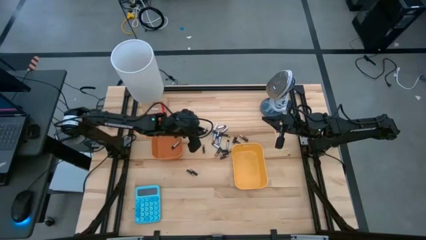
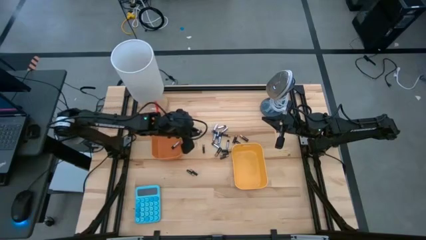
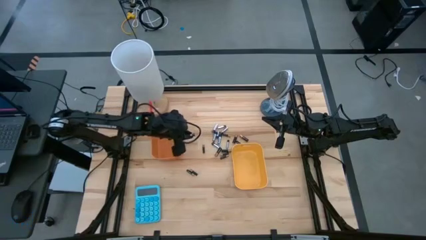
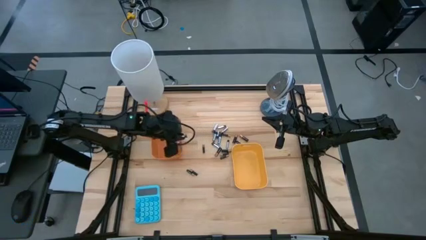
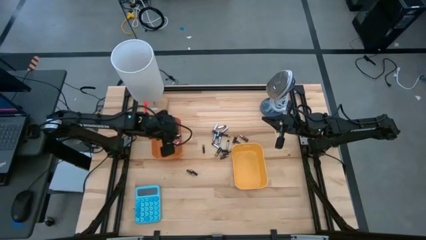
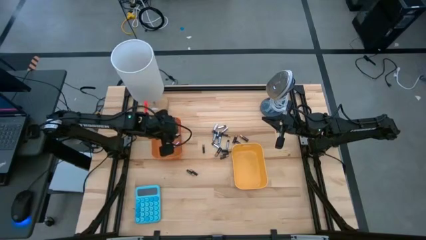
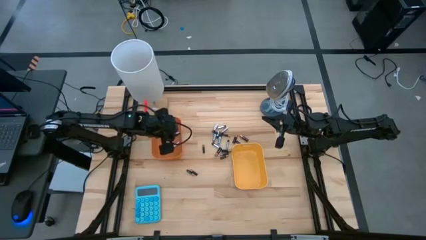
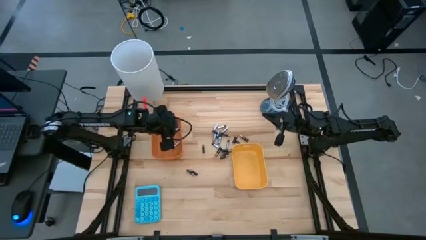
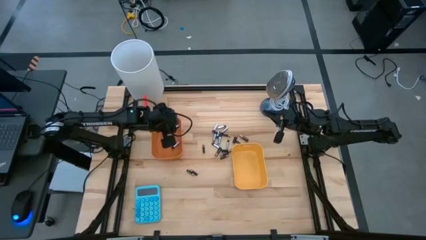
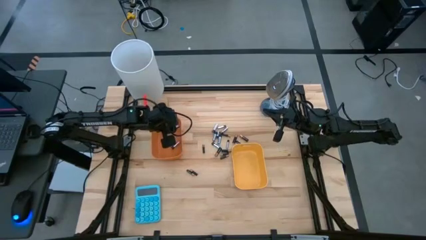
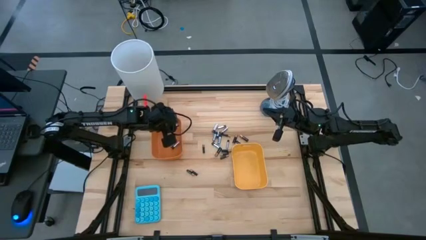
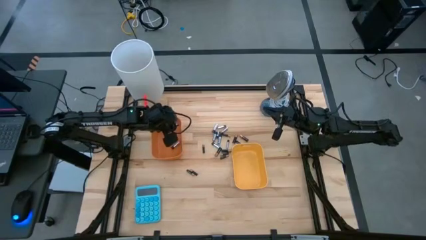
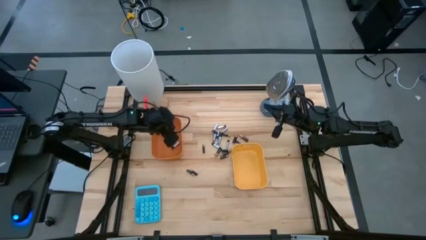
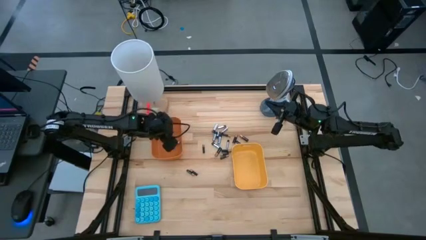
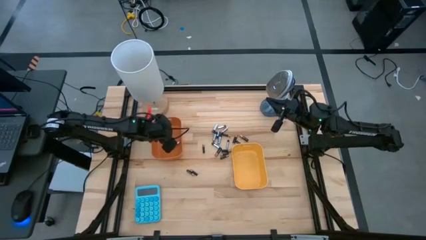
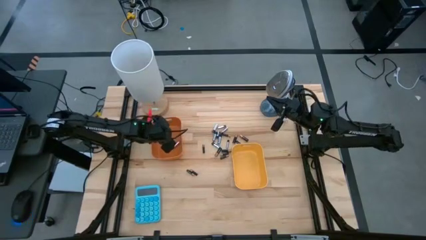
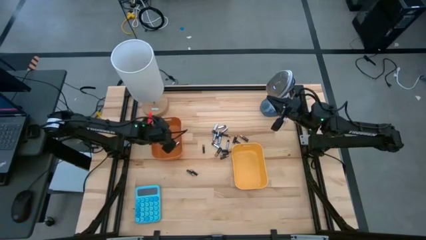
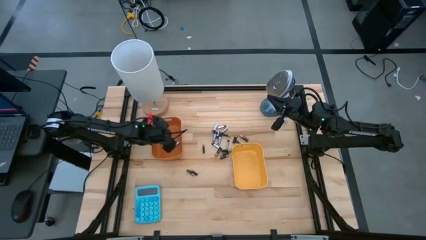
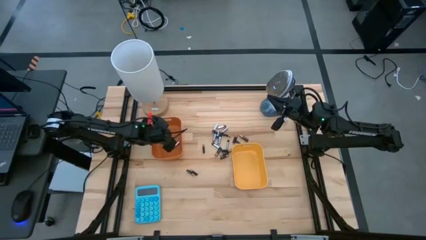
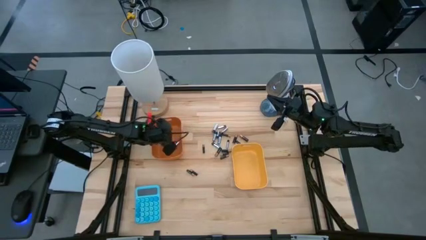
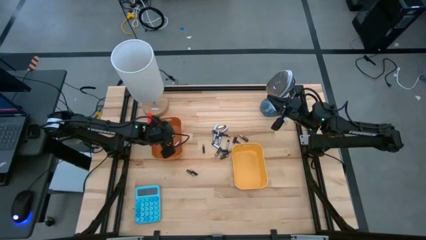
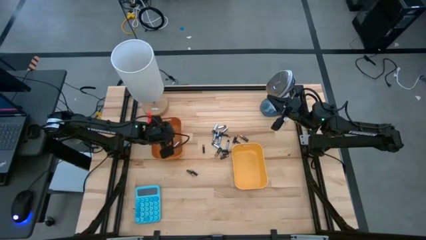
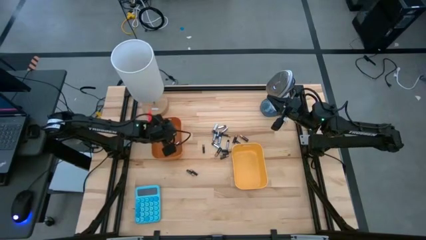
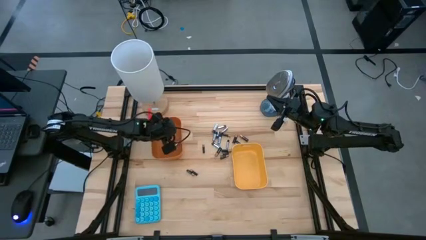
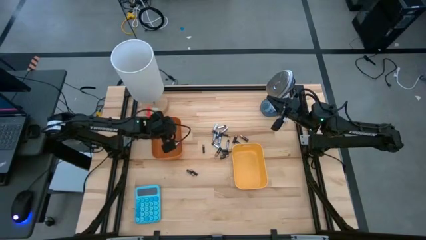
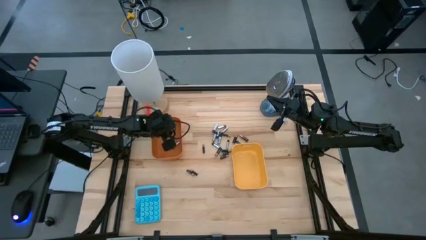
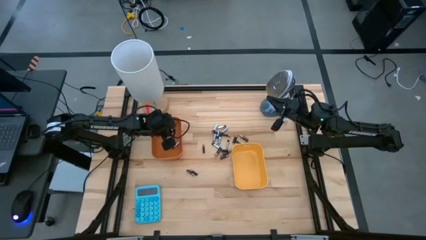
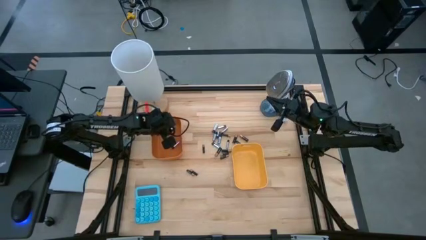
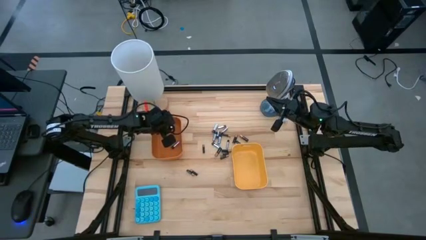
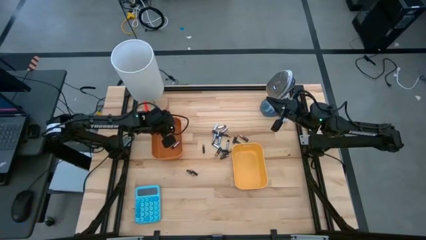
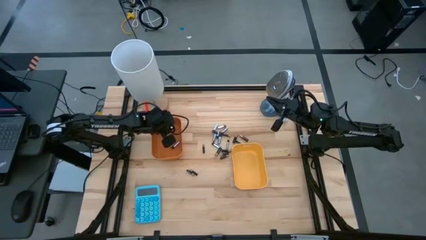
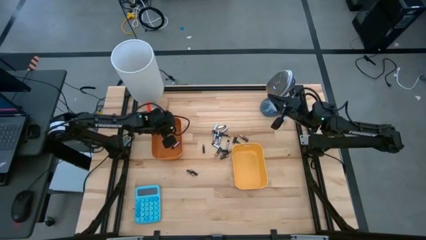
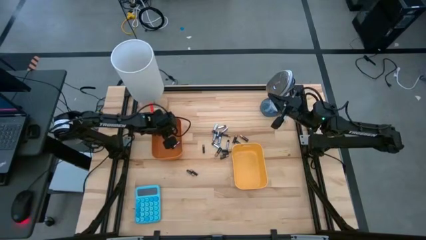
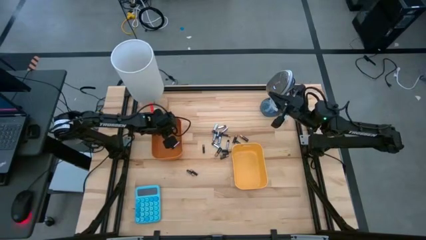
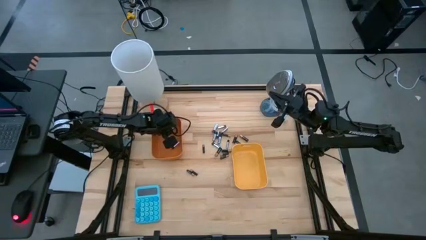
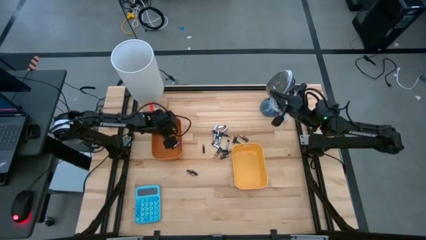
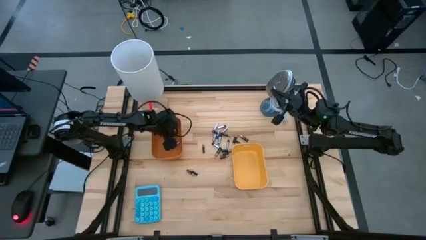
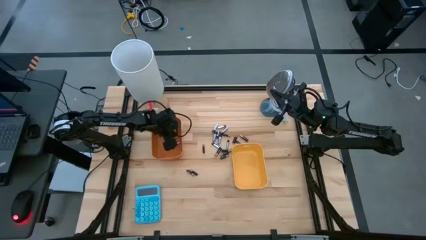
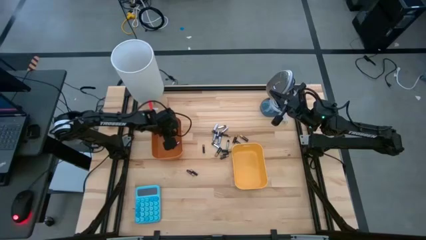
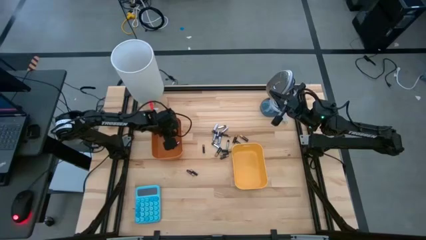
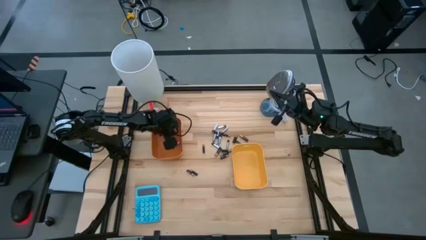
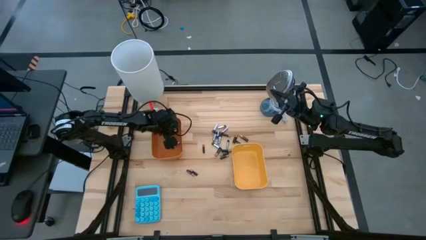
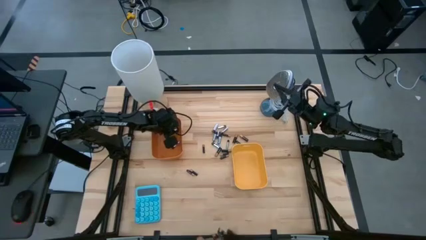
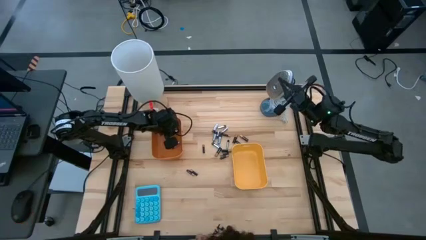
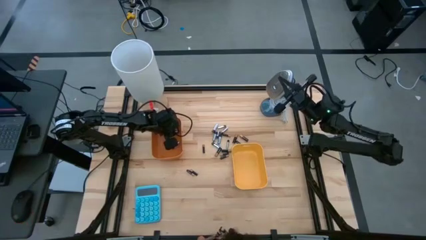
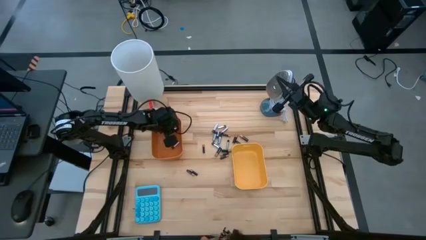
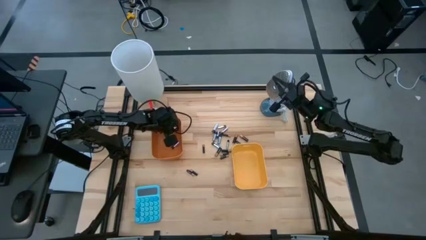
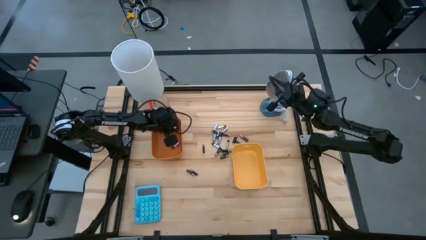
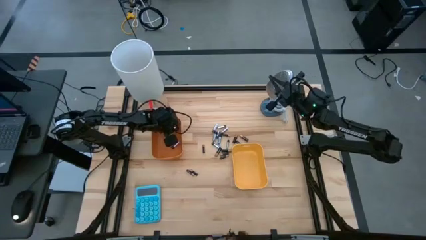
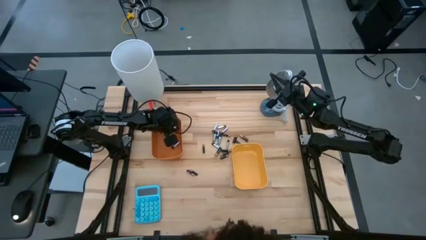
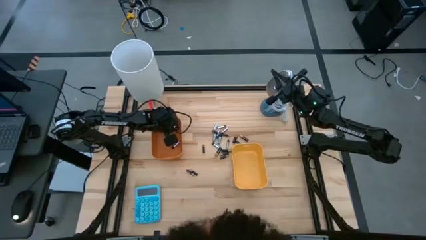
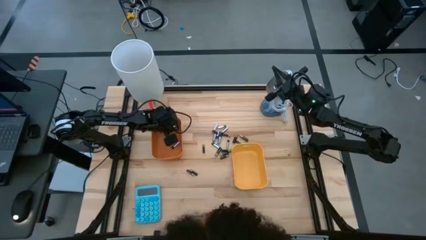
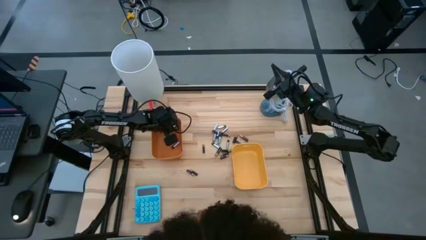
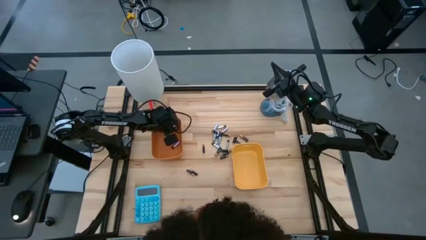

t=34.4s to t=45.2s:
Task: Sort batteries
Put the silver battery into the orange bin

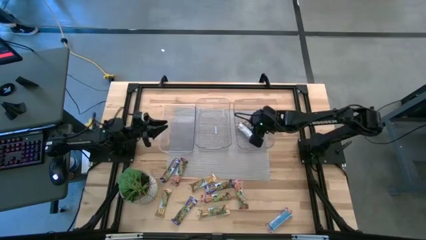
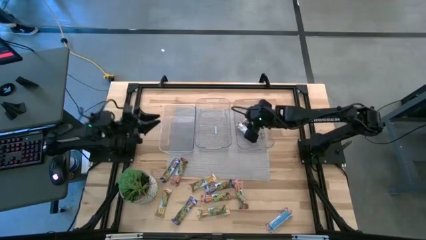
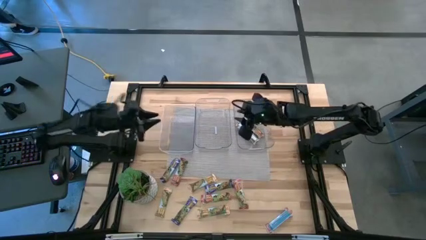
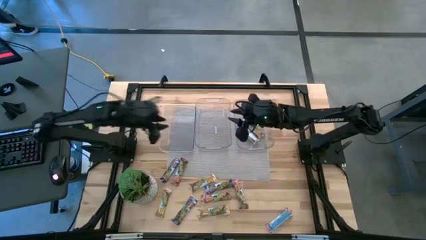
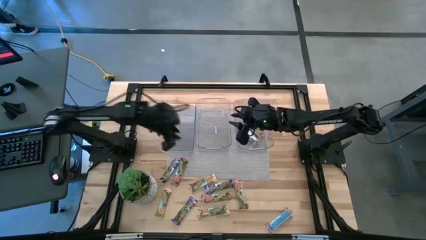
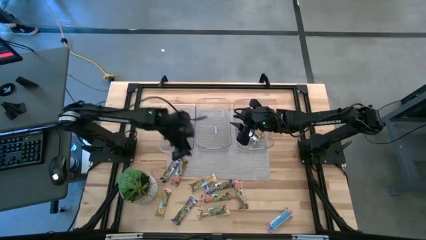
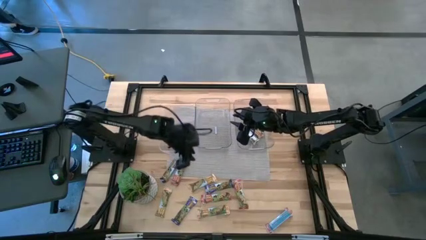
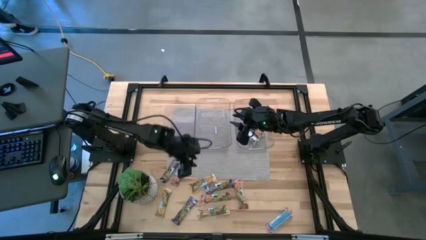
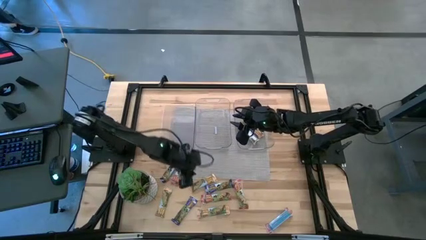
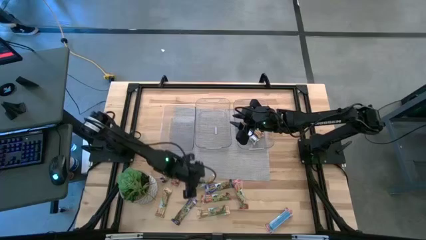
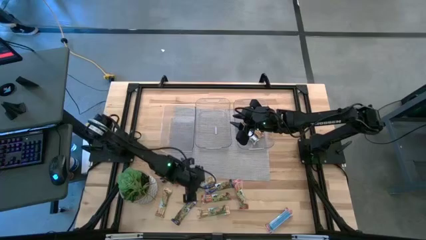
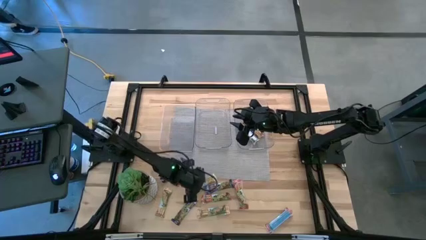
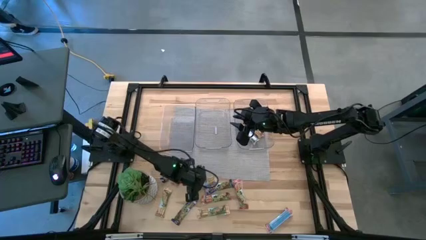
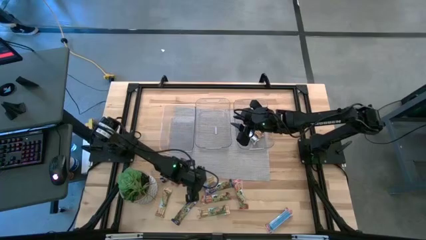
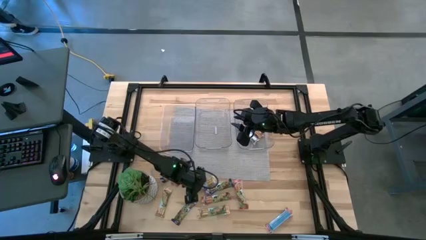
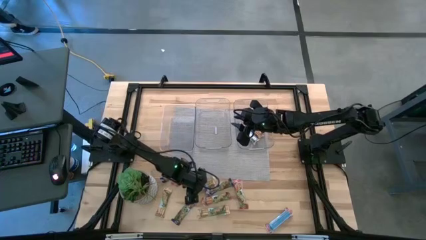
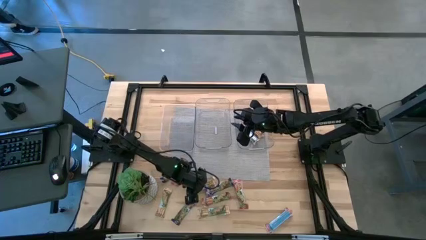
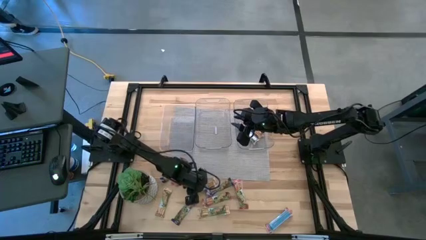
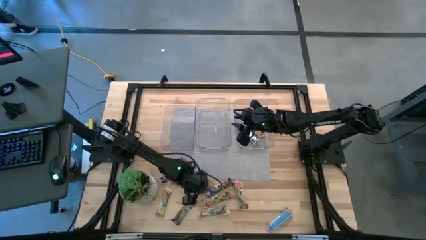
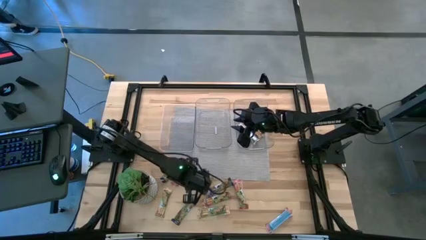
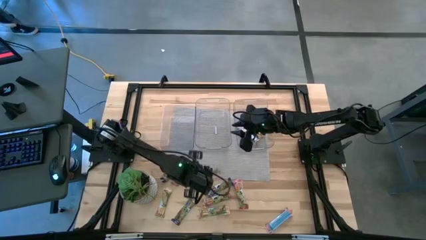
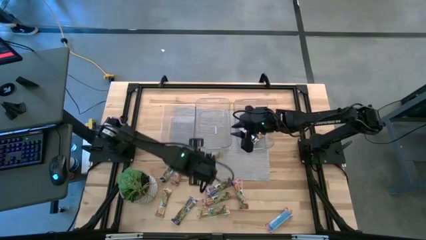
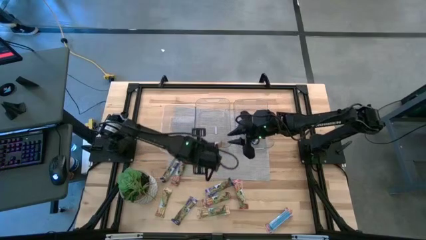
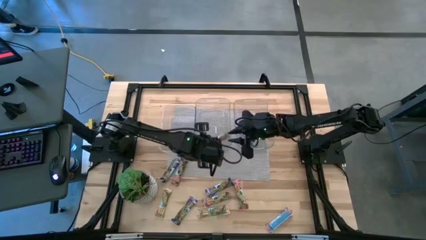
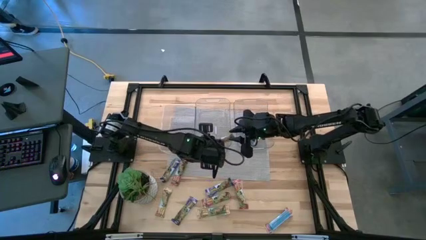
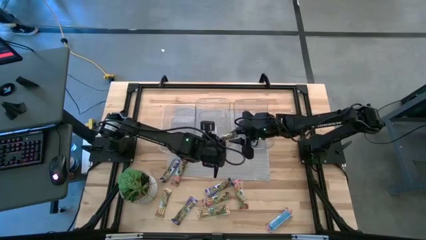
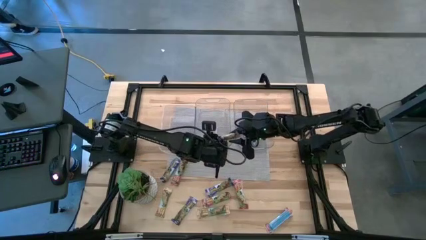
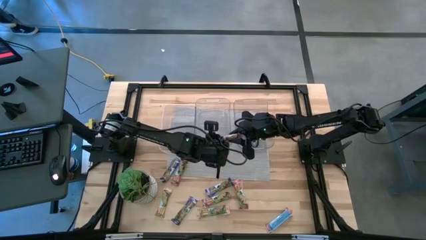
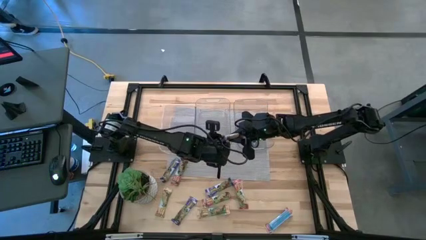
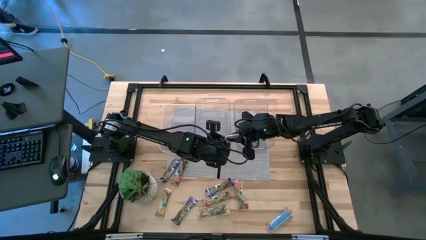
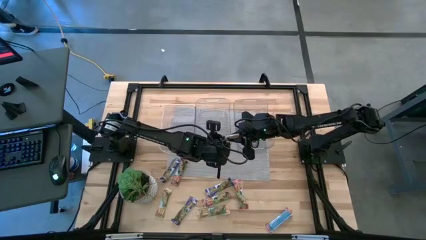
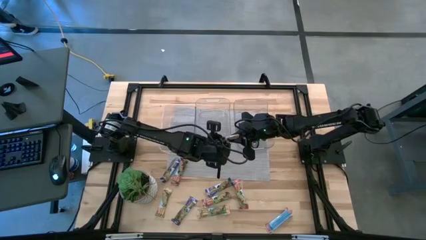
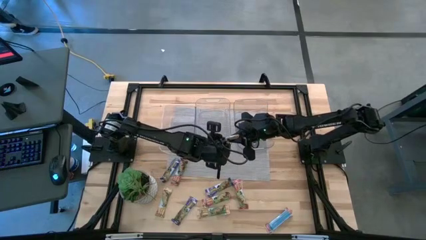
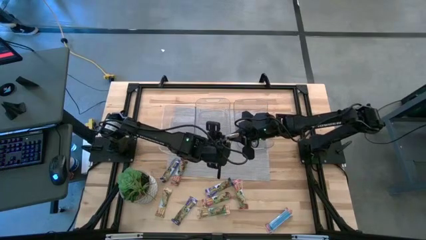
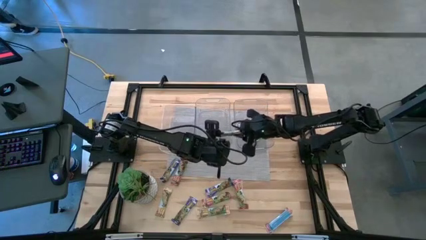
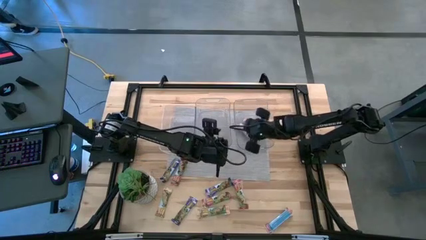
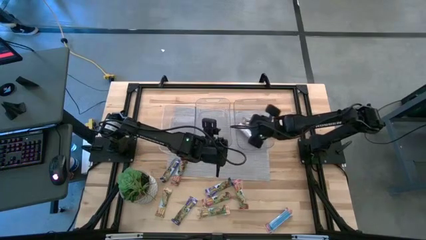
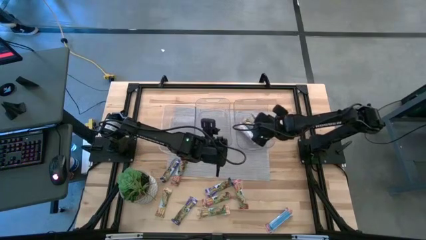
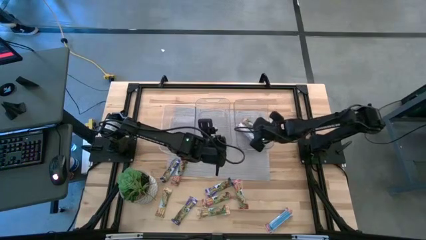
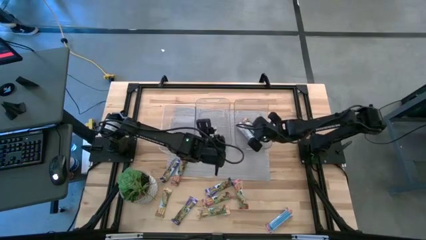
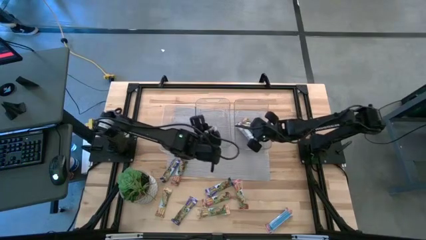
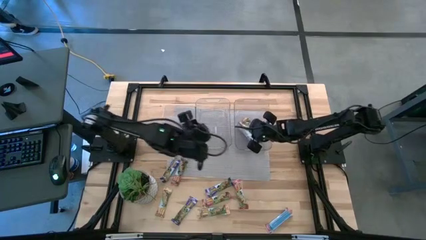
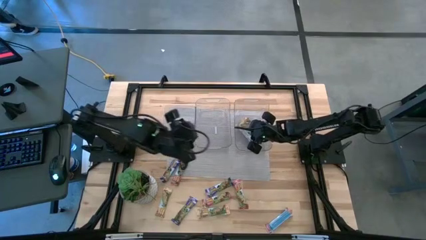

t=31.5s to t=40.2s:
Task: Pick and place Granola Bars by type
Put the orange granola bar into the right transparent bin
